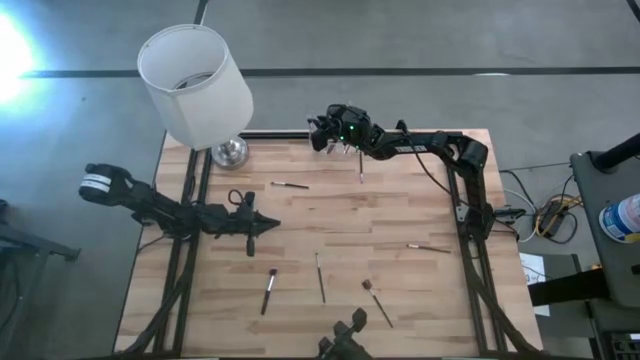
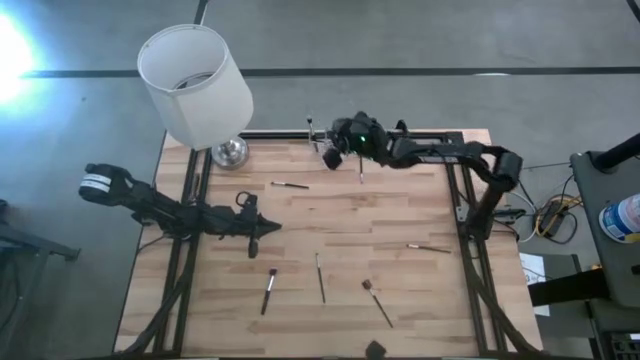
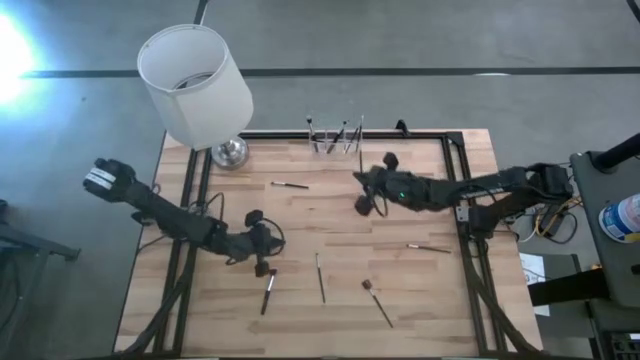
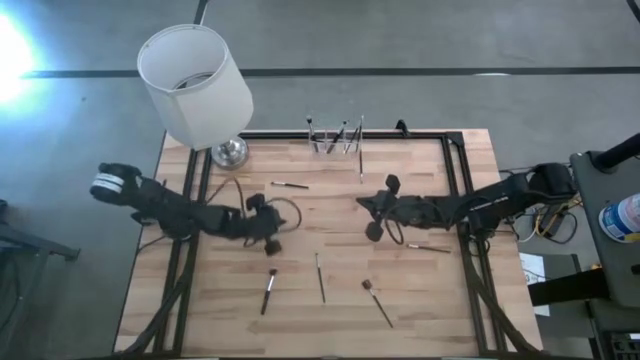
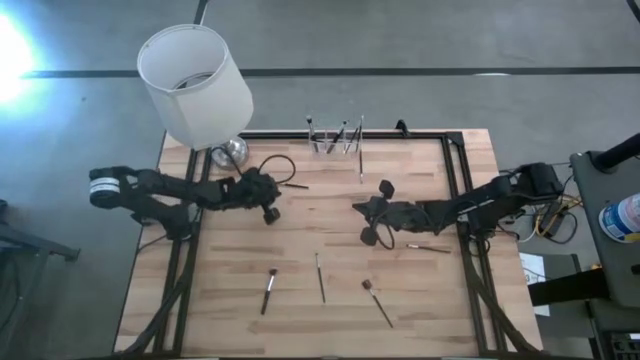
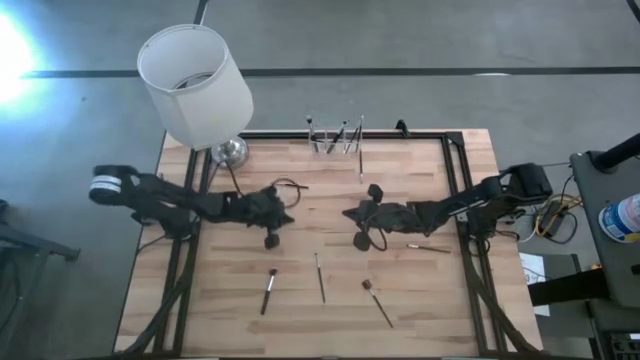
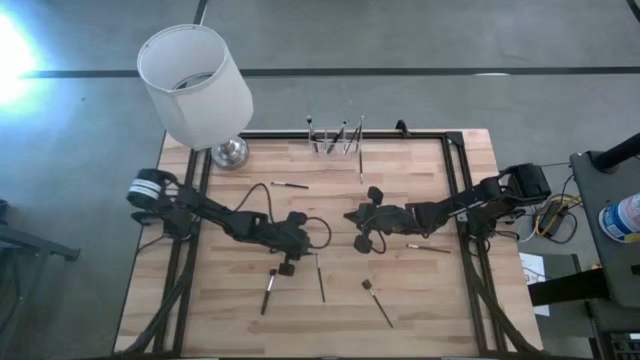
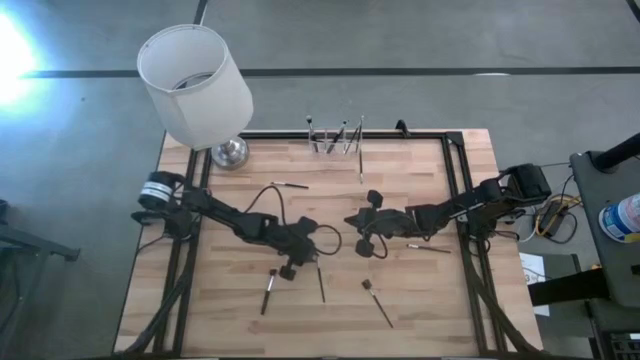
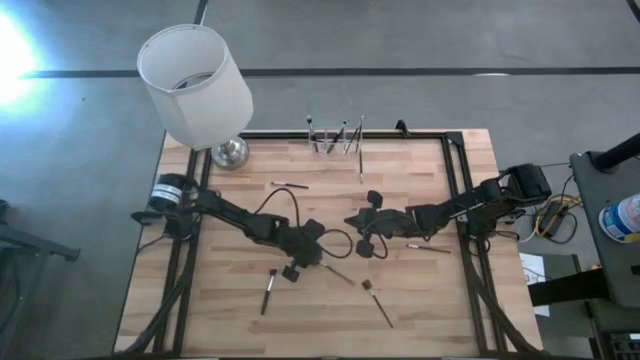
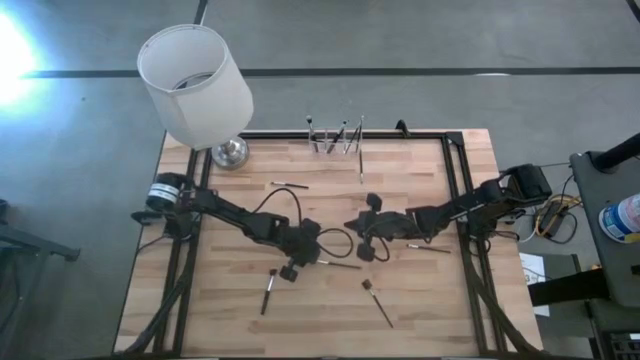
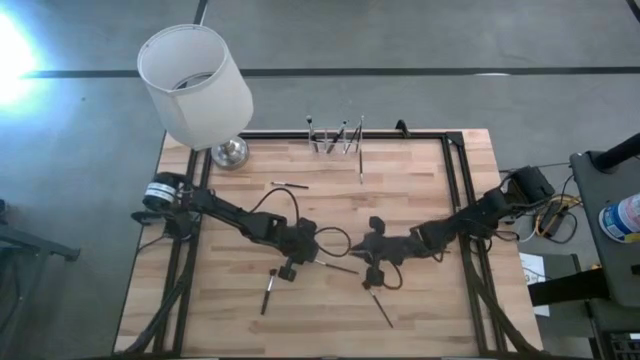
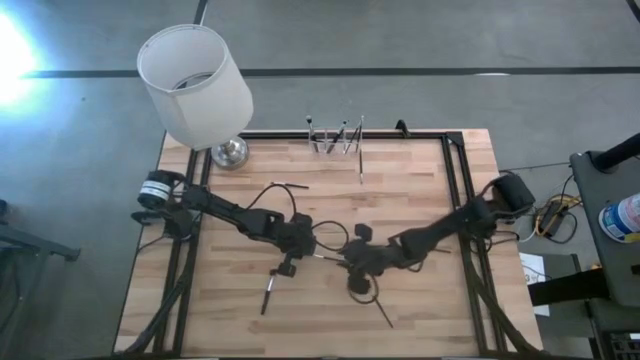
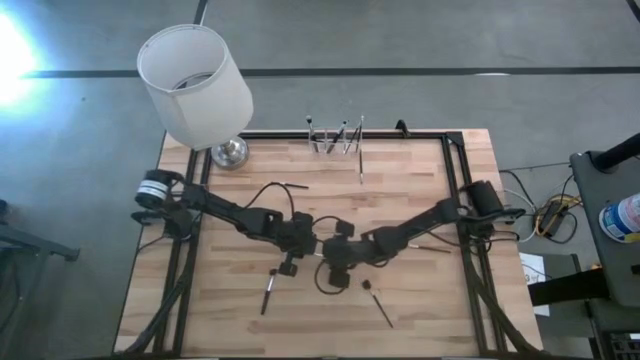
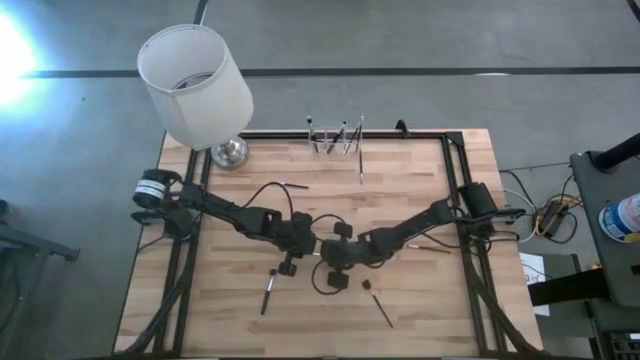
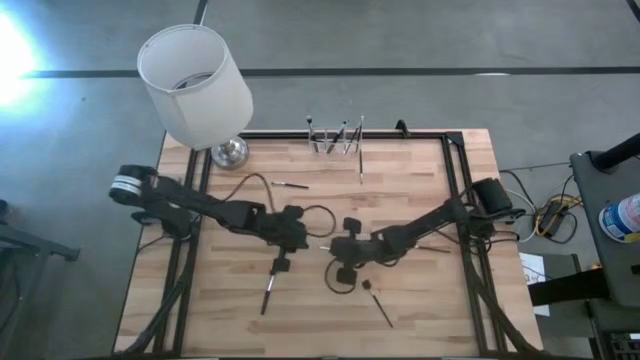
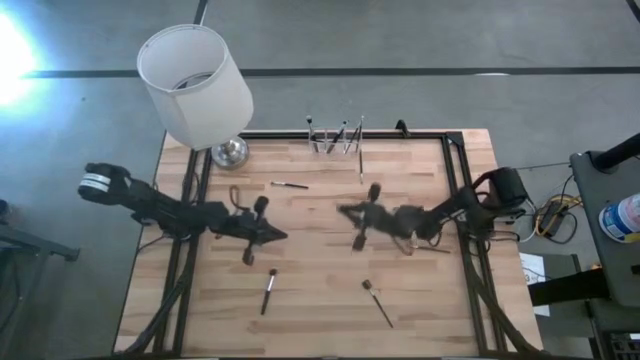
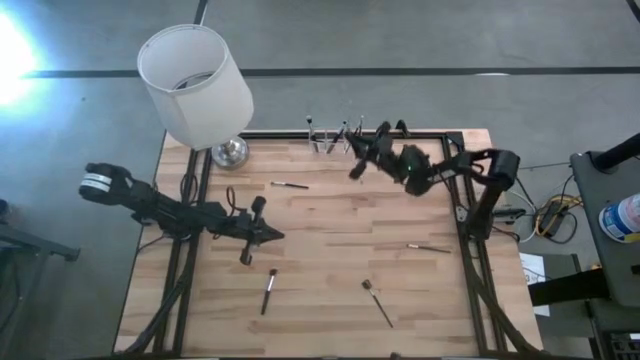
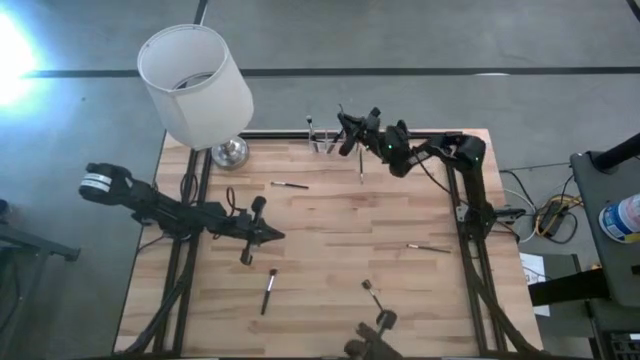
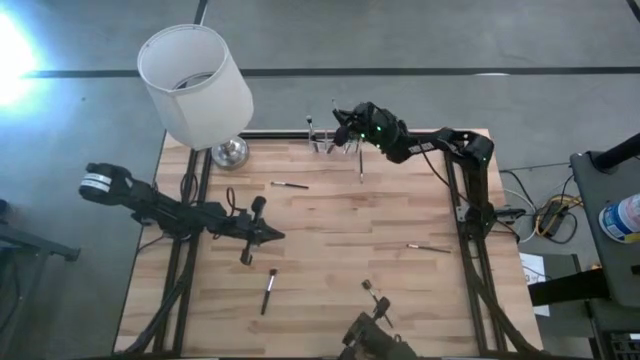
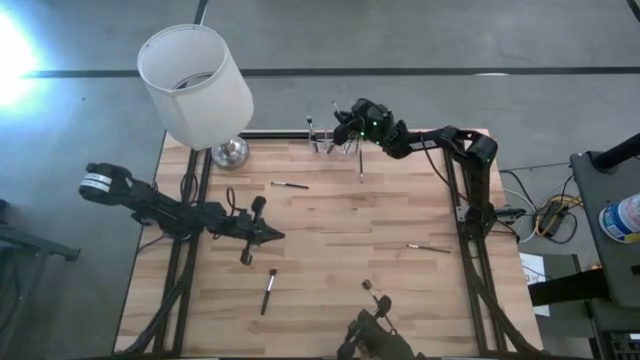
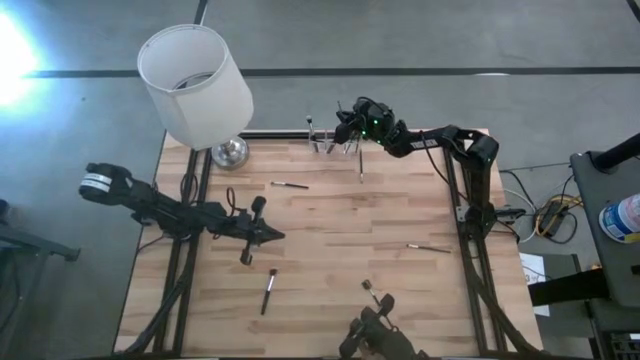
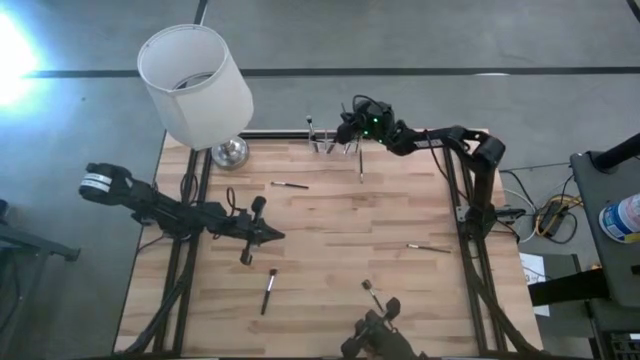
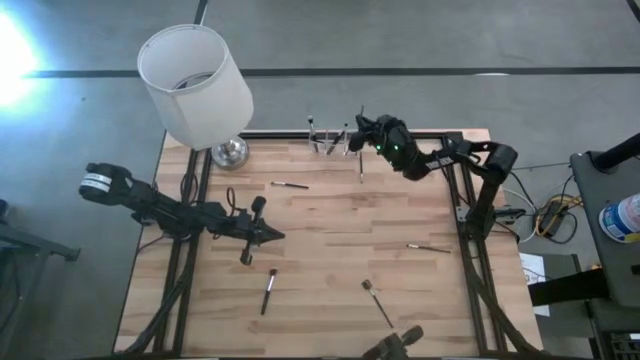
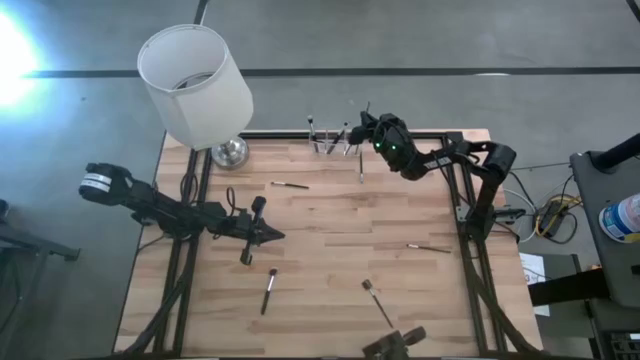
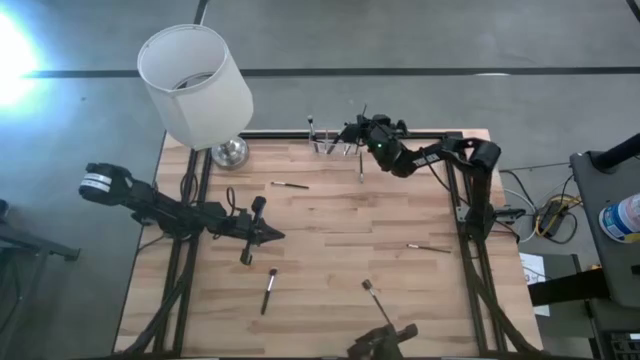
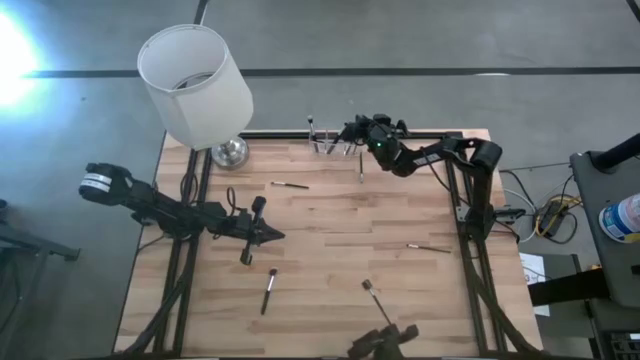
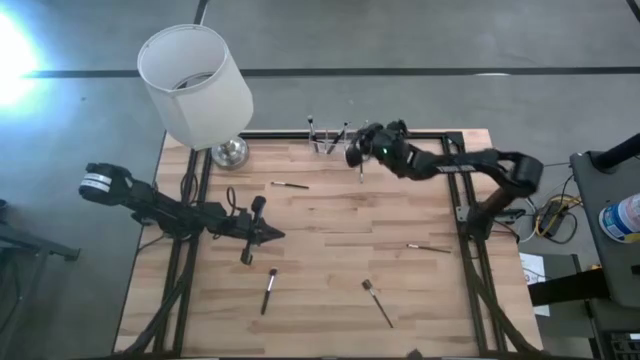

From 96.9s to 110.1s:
Task: Put items in baskets/containers
Put the eyeshadow brush into the transparent organizer

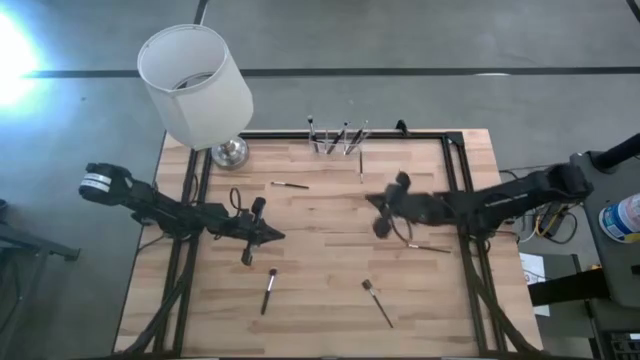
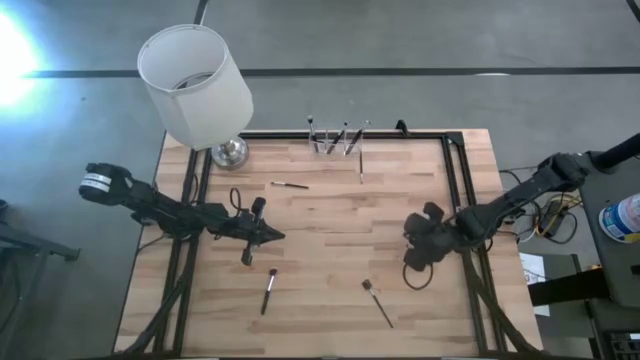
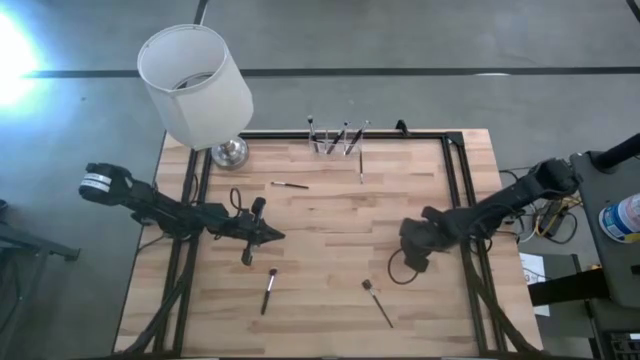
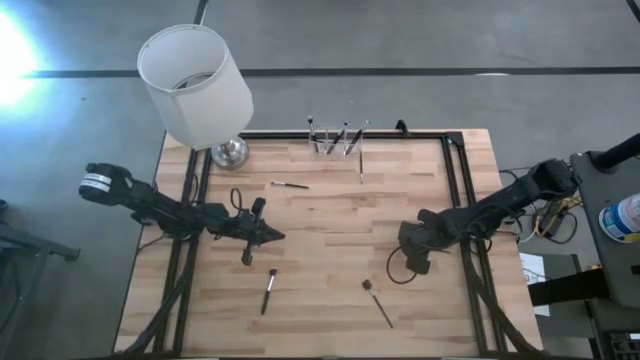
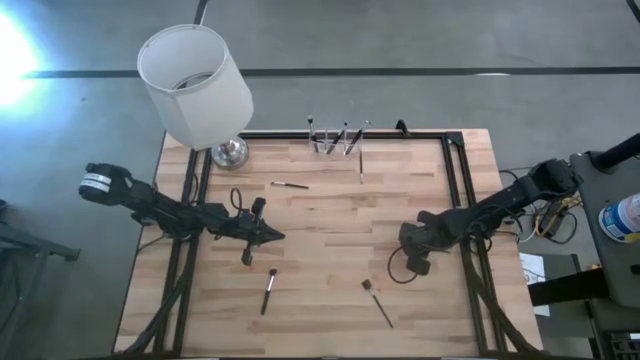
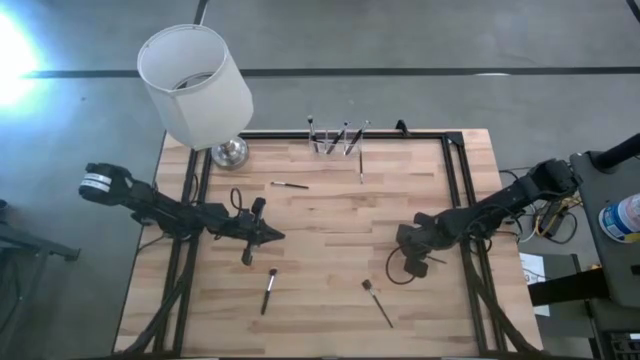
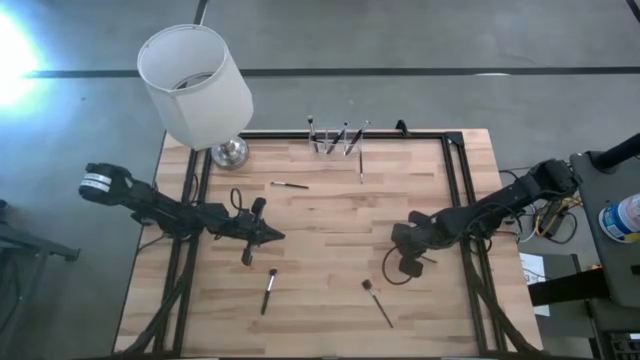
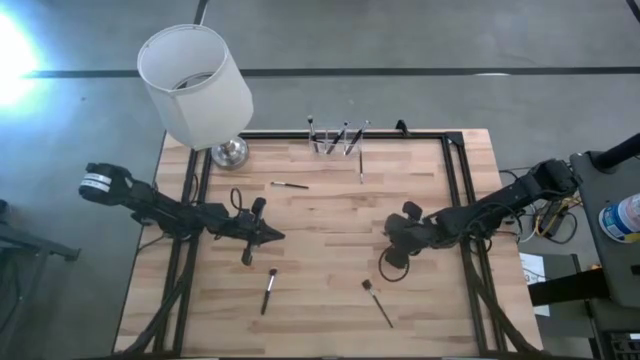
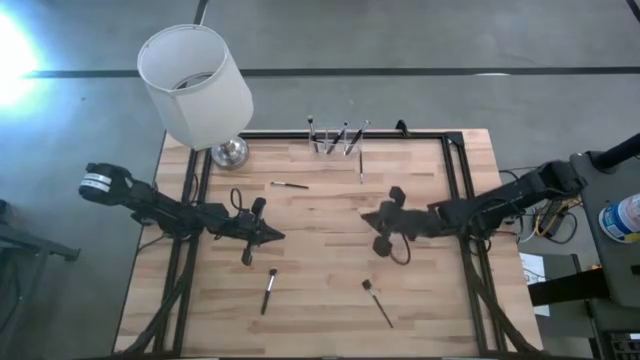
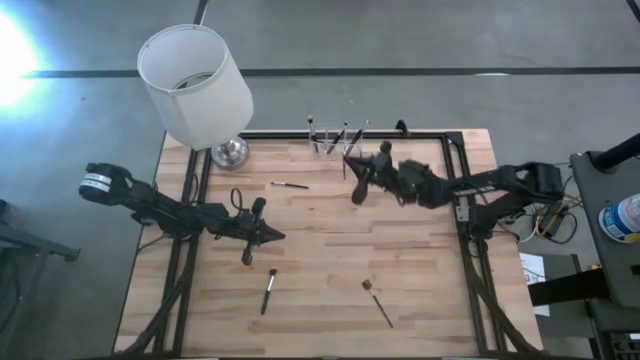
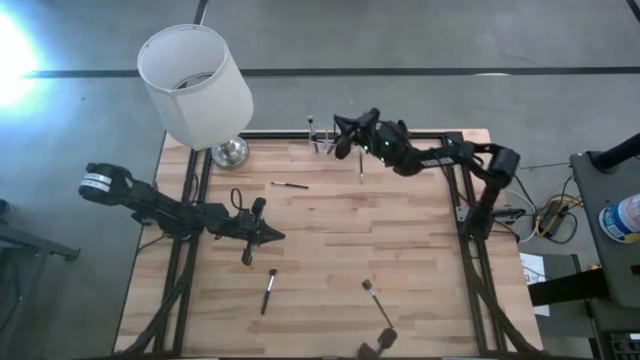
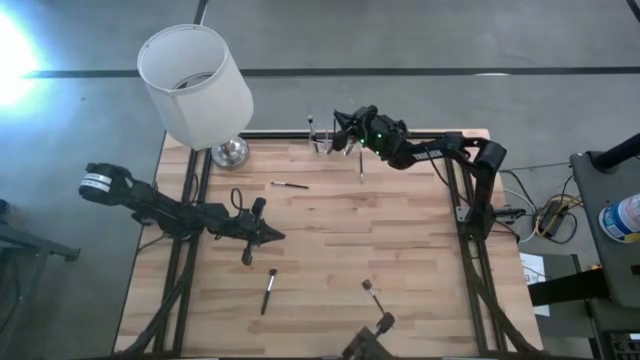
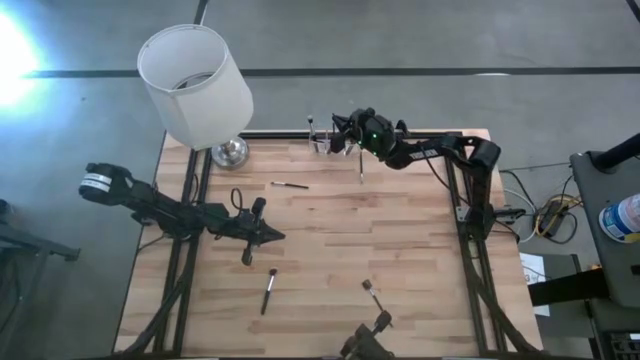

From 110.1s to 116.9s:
Put the eyeshadow brush into the transparent organizer

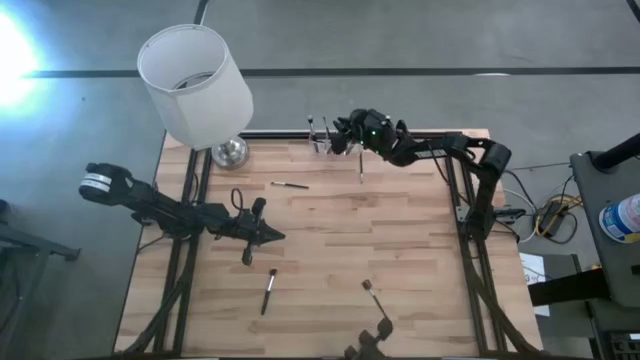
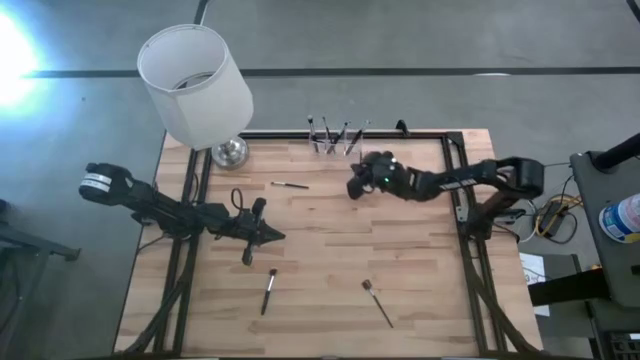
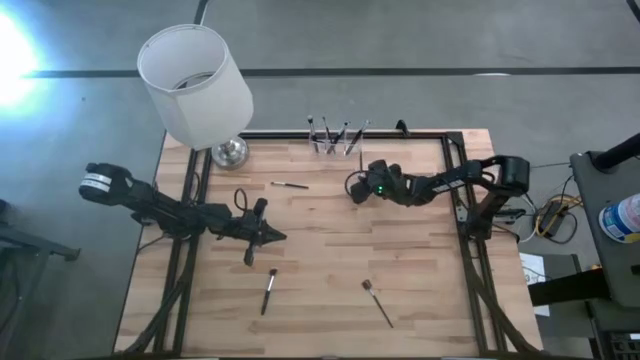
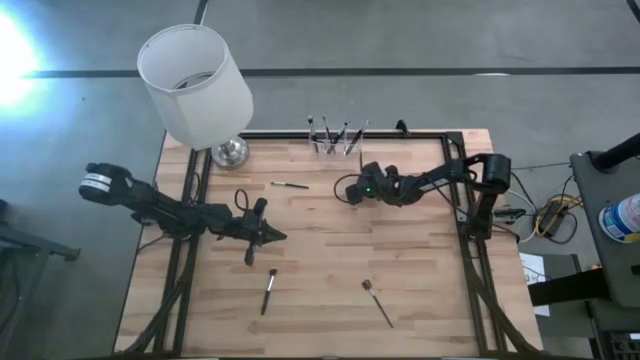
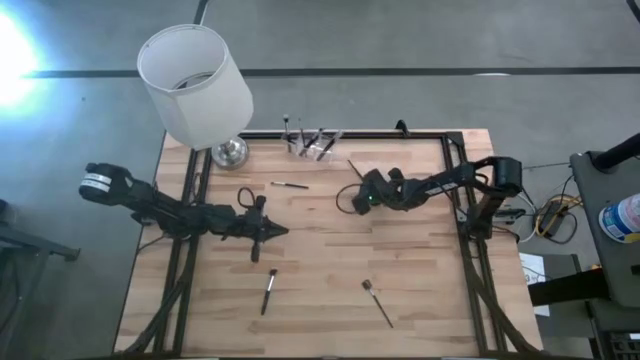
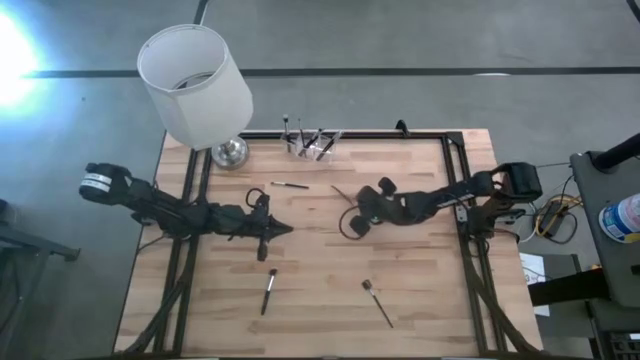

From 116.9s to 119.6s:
Put the eyeshadow brush into the transparent organizer
